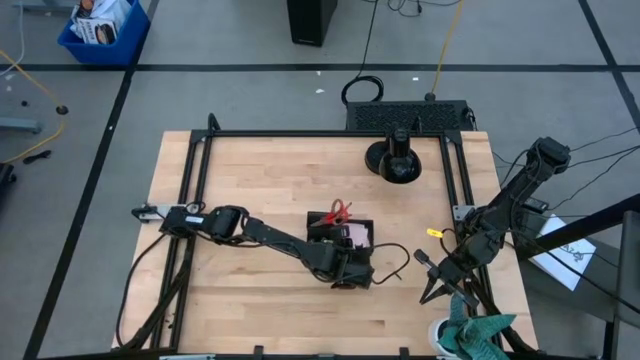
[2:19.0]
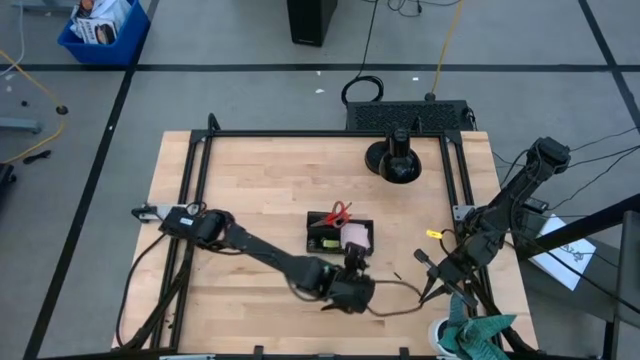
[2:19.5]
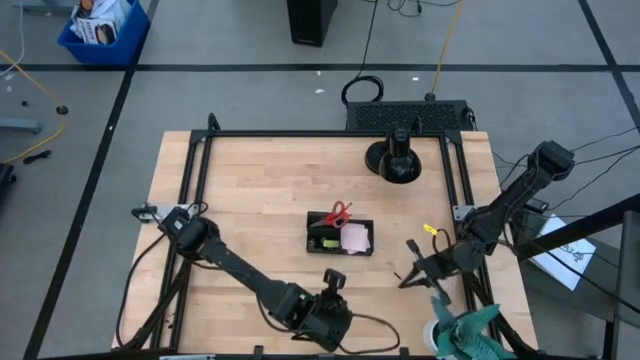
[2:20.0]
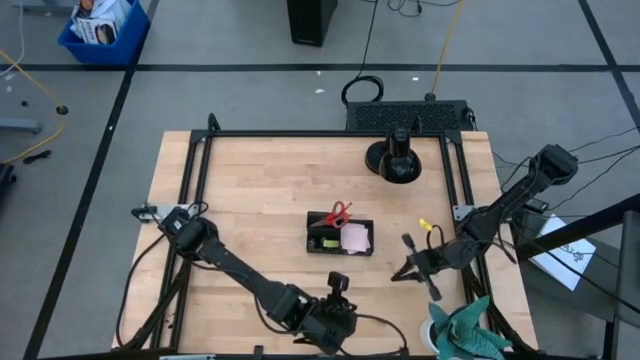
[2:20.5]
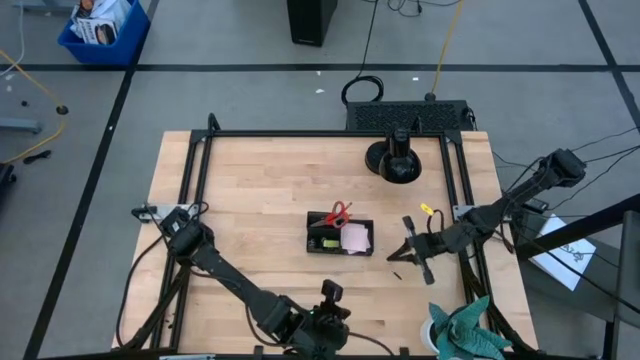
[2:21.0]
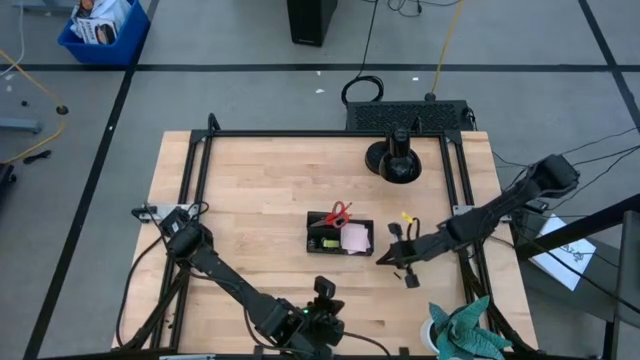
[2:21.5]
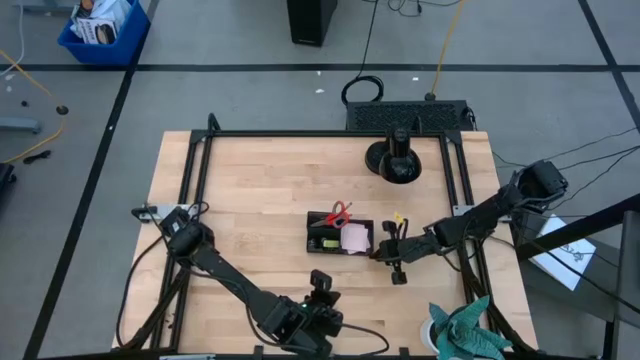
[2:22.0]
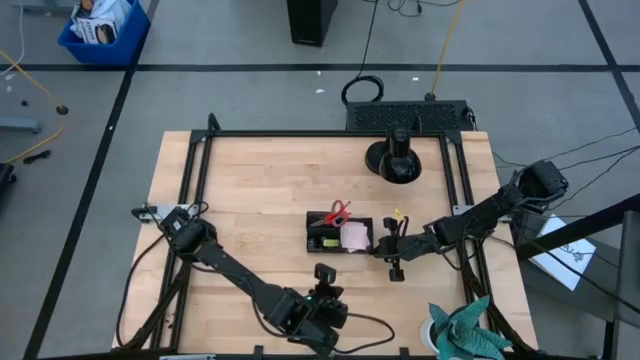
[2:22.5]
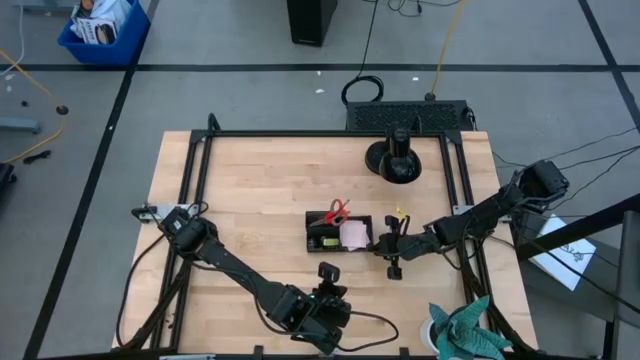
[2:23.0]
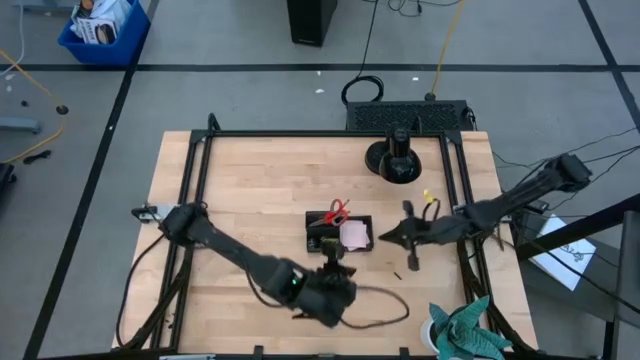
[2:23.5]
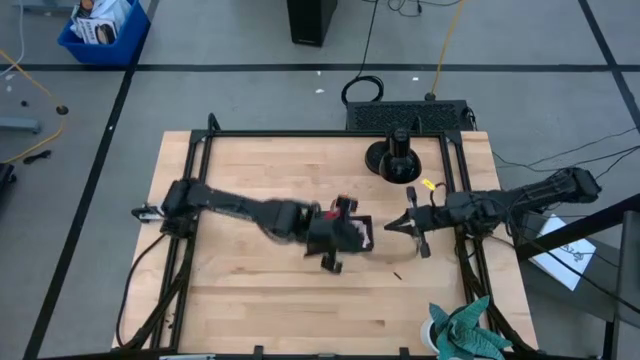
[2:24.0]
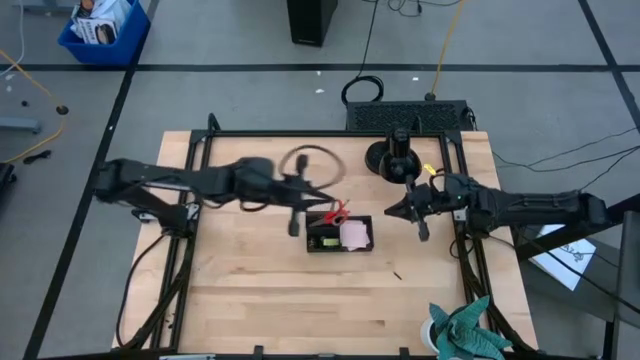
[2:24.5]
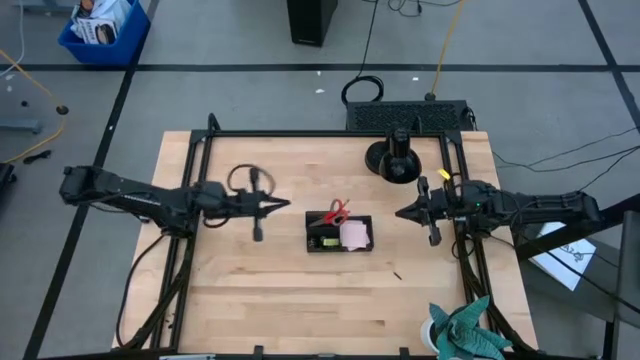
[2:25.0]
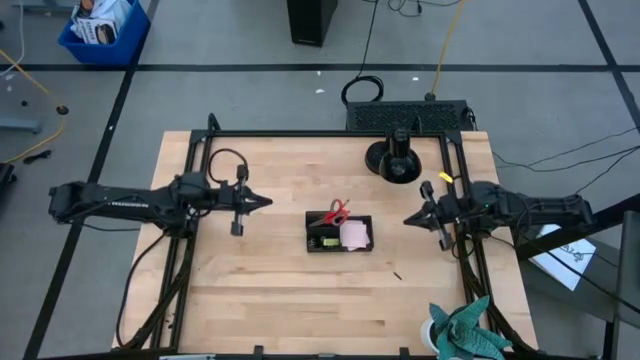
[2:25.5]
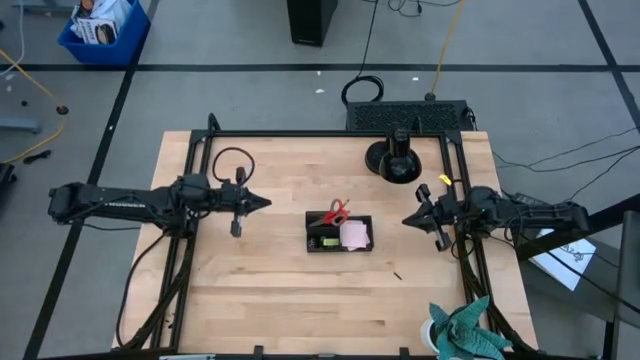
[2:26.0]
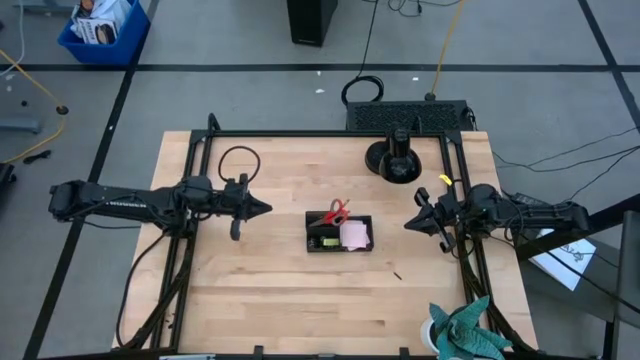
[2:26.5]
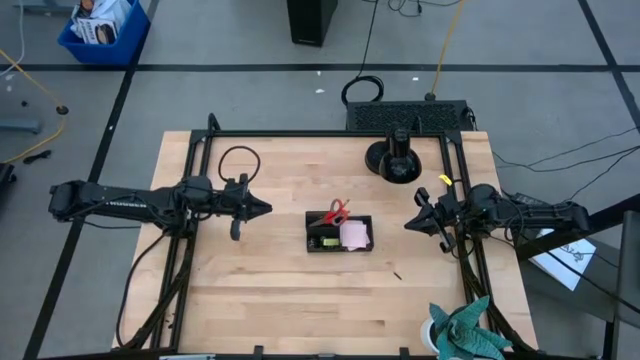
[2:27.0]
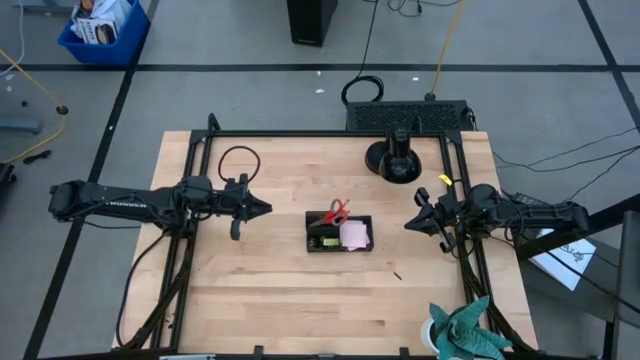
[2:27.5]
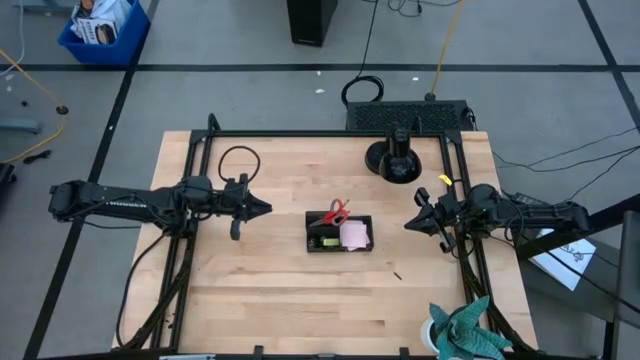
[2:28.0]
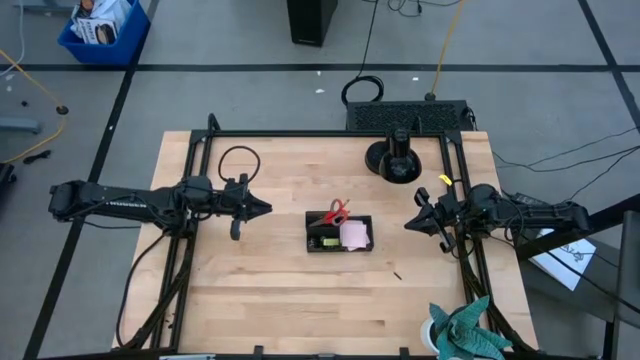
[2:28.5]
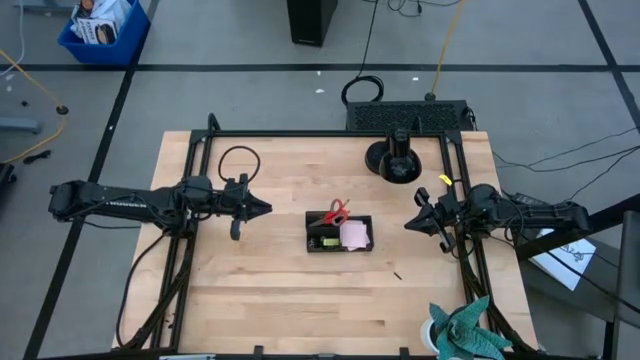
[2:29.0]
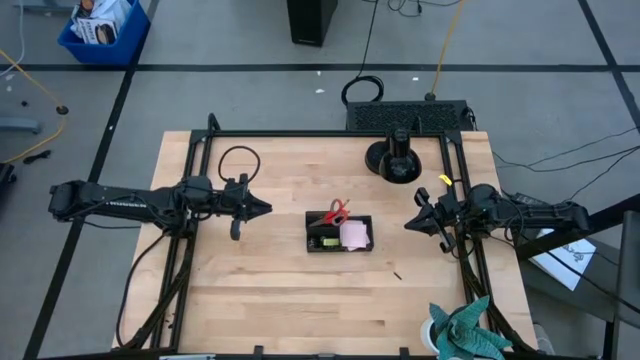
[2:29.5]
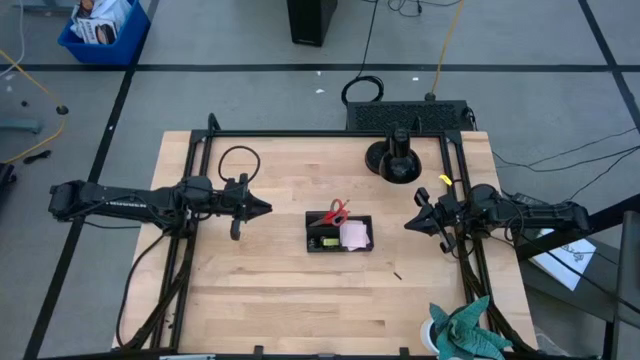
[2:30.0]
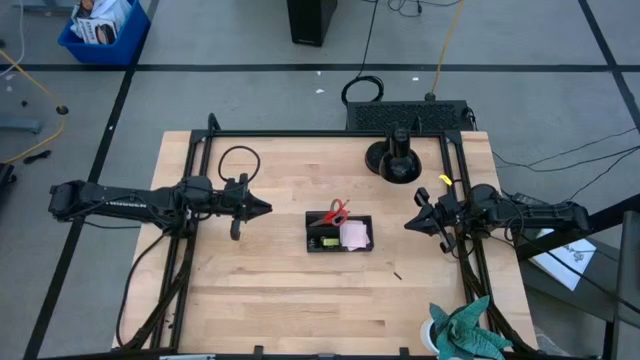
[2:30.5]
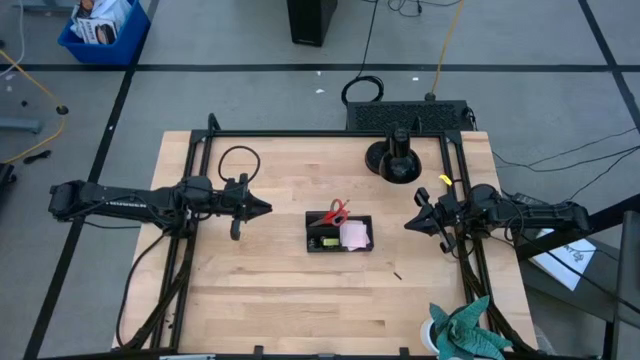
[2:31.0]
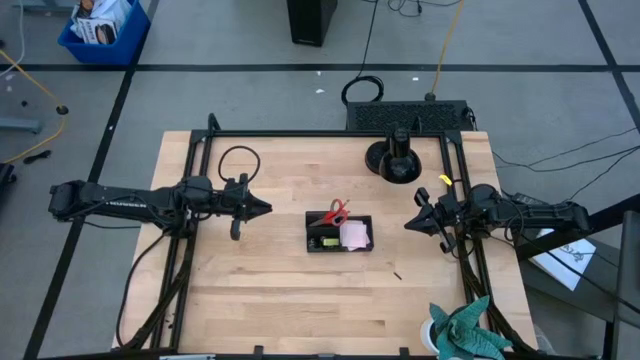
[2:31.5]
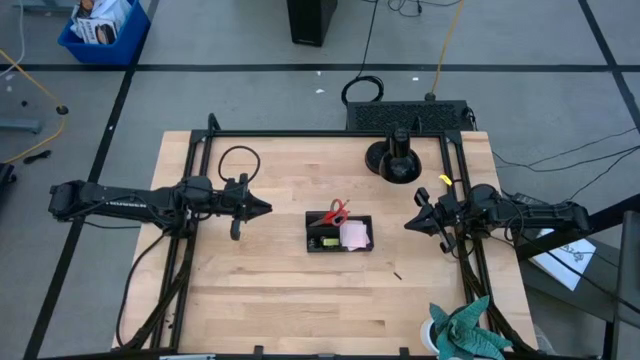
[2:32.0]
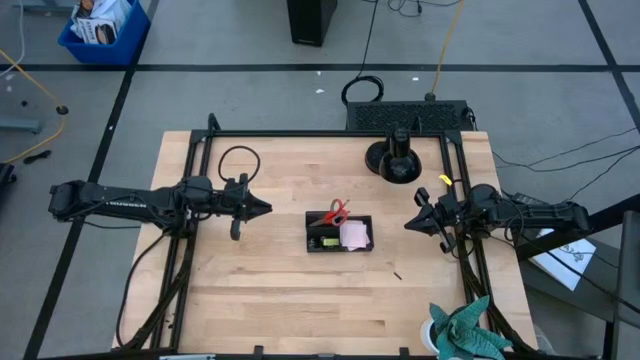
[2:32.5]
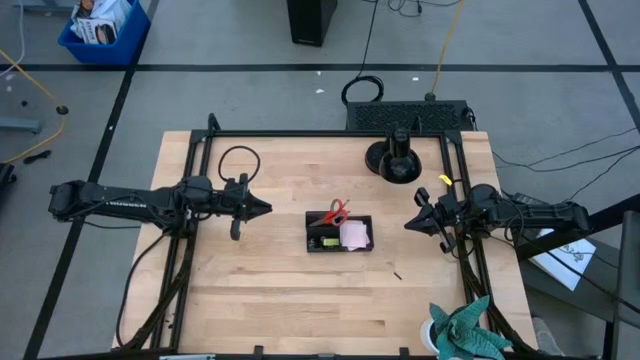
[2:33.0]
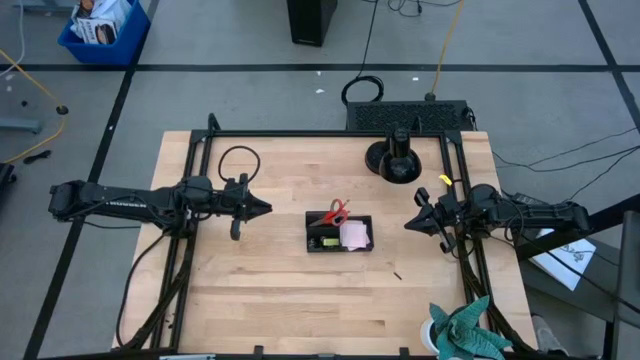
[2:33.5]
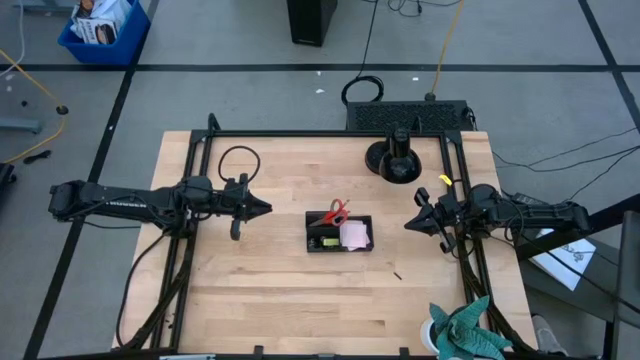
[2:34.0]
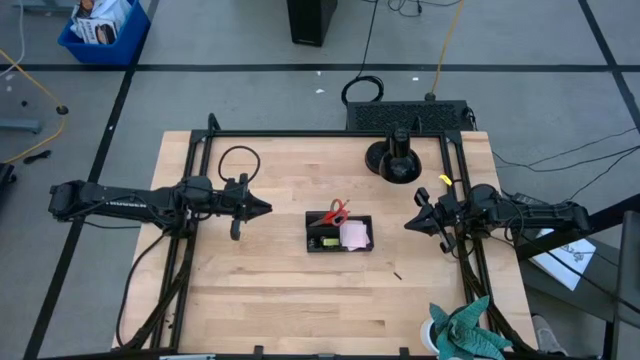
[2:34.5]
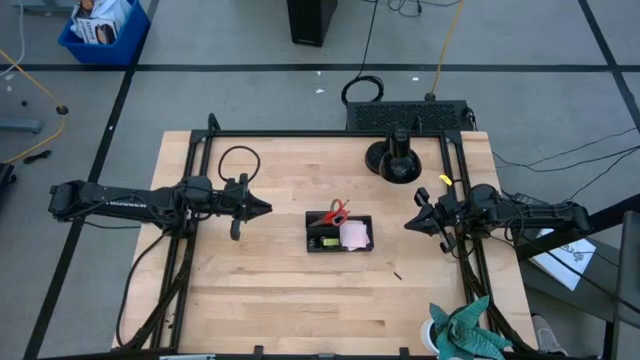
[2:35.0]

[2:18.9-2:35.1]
Task: Pick and place office supplies into organizer
Return to Home Position

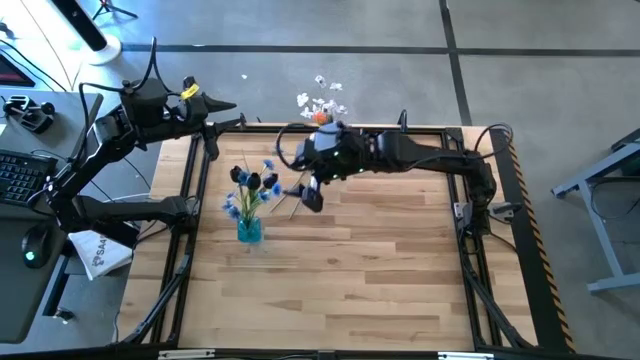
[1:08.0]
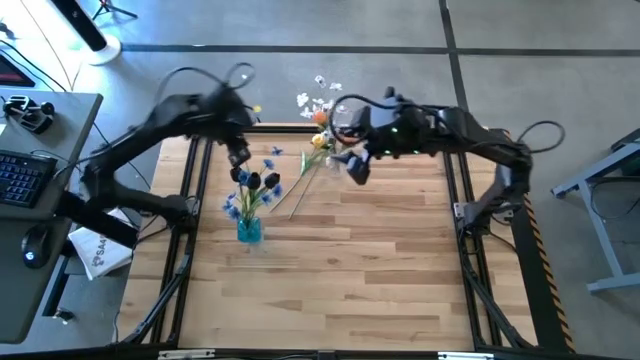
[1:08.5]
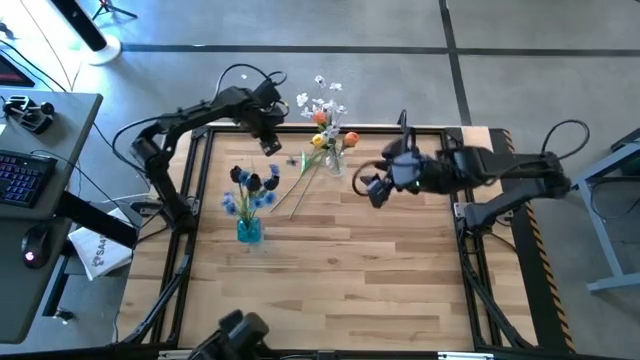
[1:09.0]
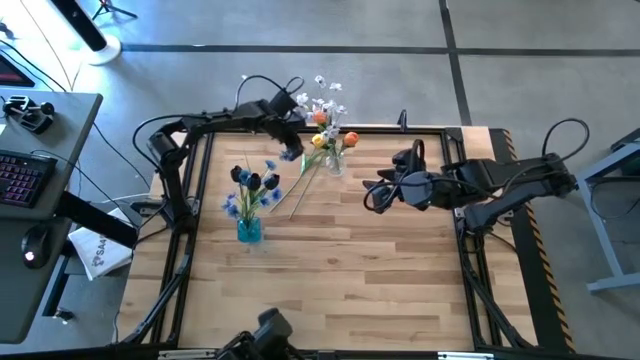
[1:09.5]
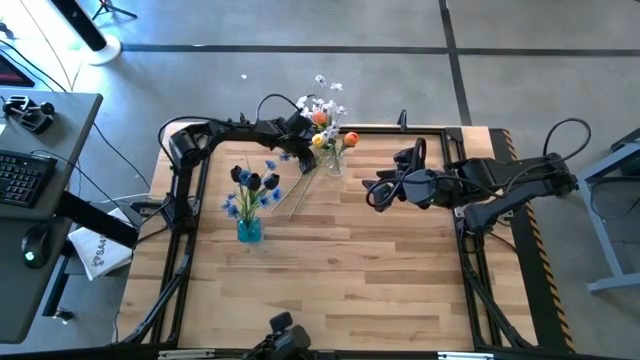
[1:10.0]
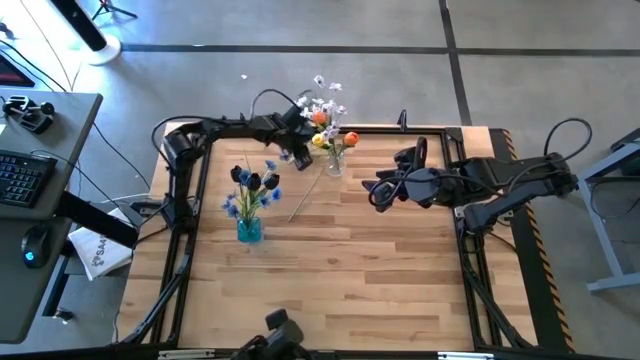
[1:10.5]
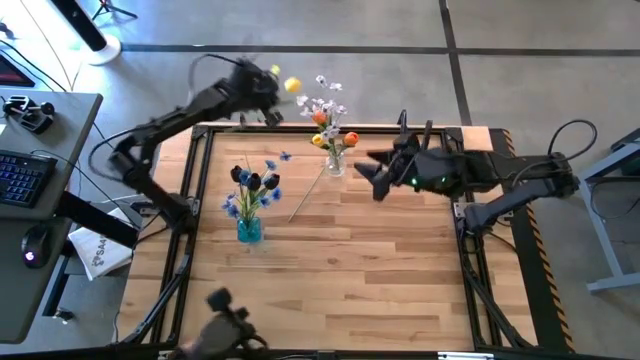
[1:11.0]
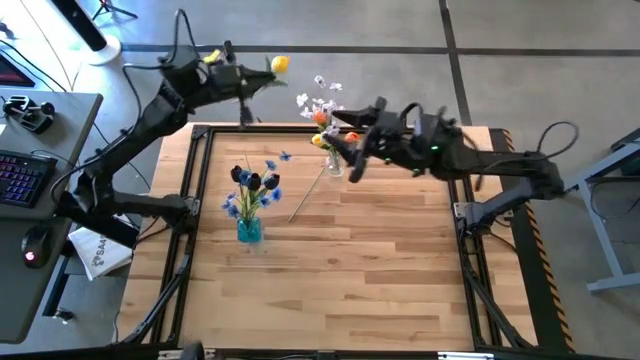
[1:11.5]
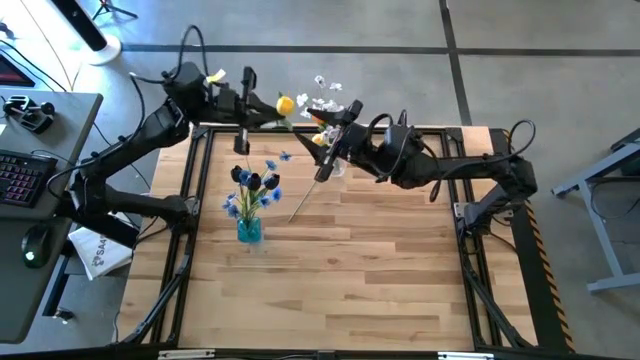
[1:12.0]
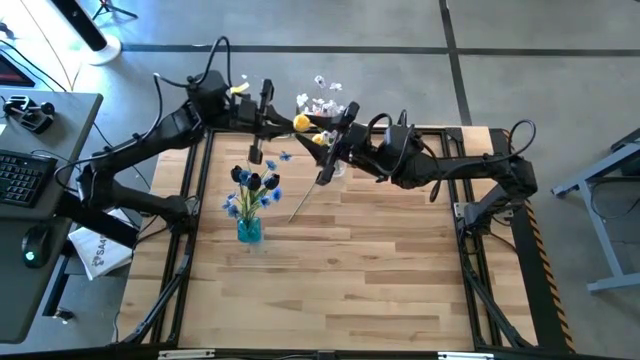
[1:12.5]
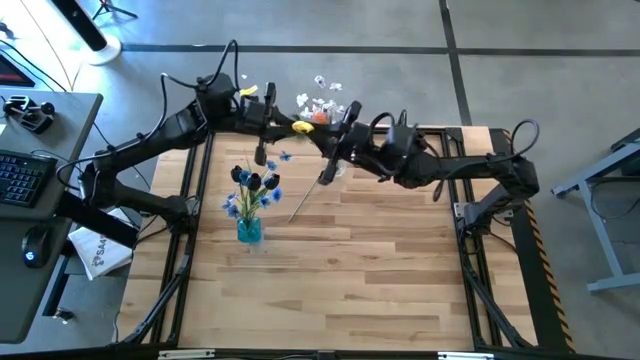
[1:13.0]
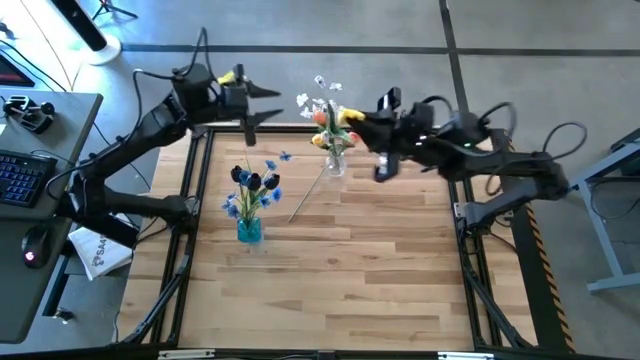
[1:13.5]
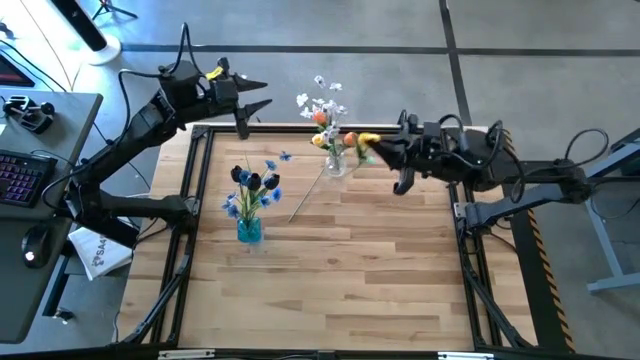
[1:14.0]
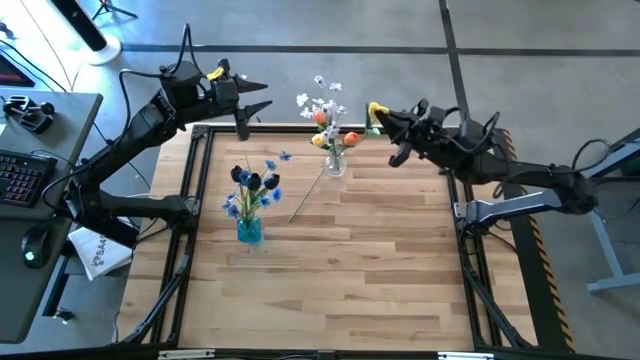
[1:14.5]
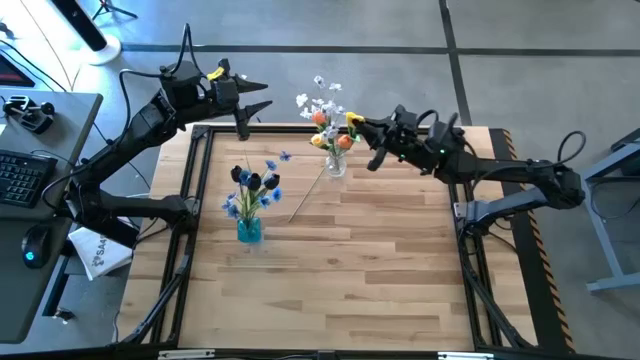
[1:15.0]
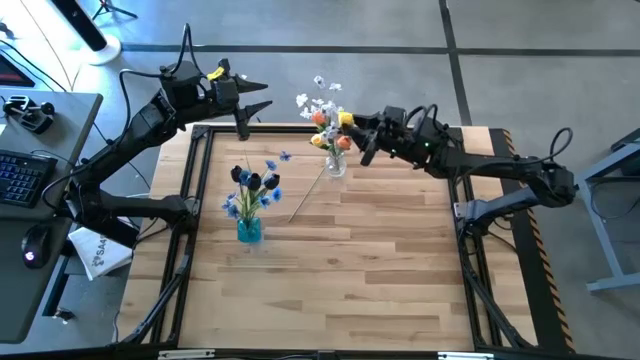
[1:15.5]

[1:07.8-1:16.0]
Task: Sort flowers into vase by color
Put the yellow flower into the transparent vase
